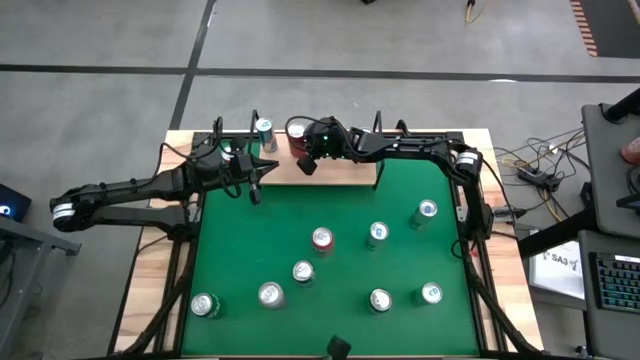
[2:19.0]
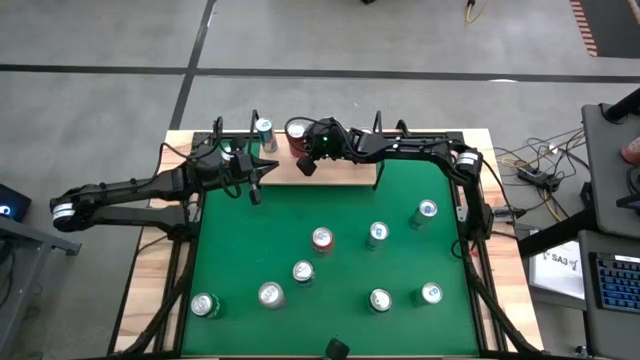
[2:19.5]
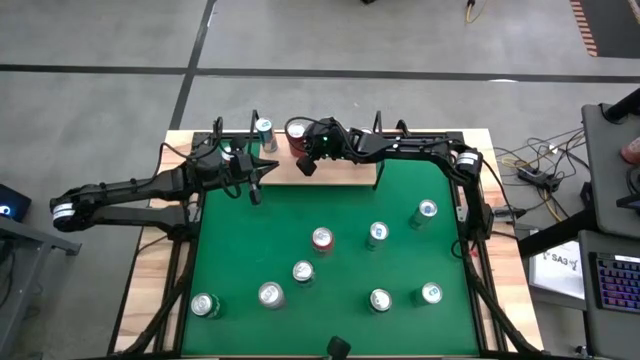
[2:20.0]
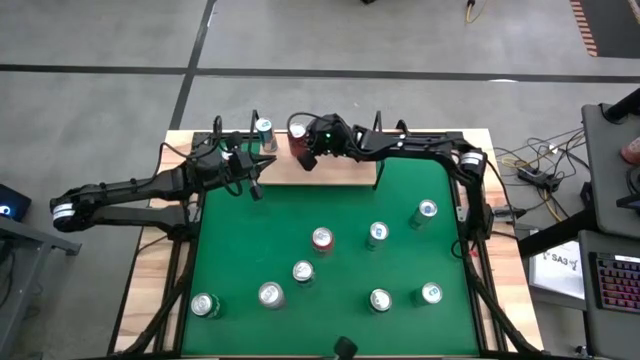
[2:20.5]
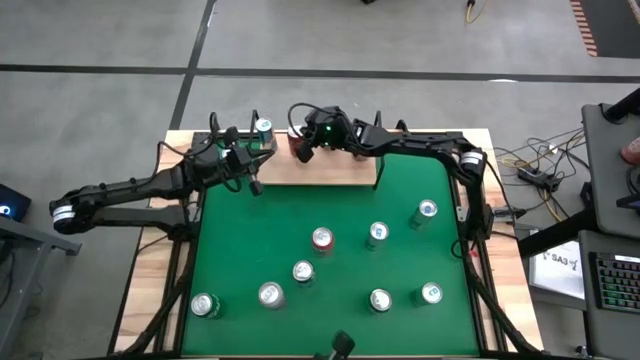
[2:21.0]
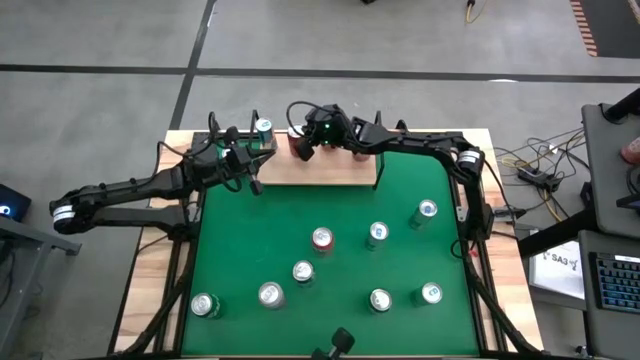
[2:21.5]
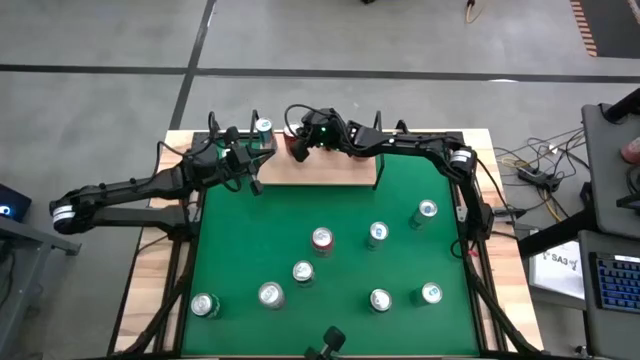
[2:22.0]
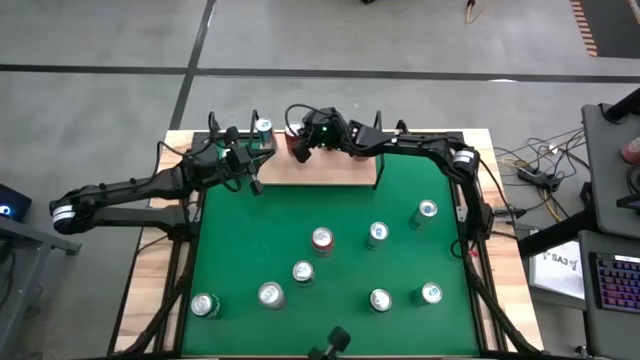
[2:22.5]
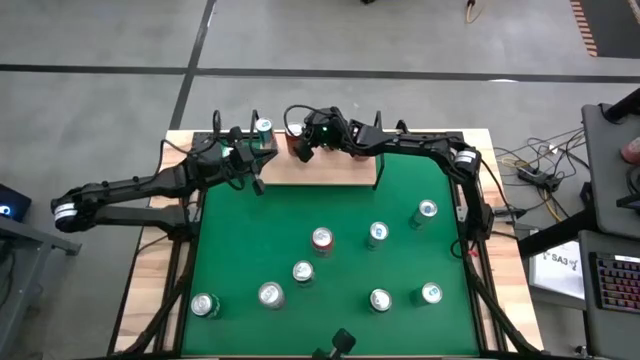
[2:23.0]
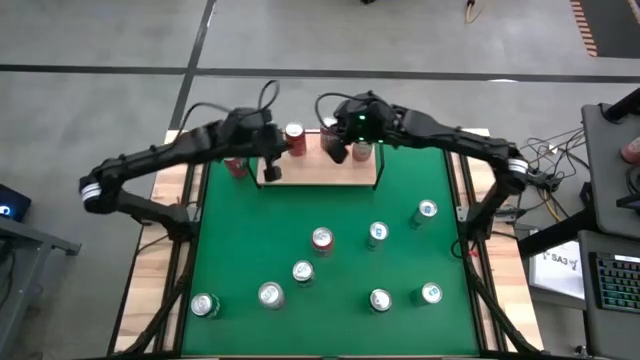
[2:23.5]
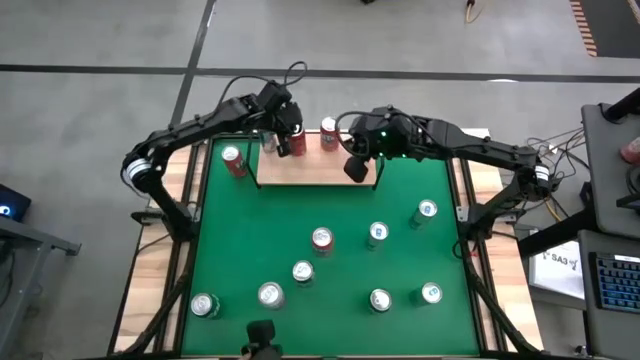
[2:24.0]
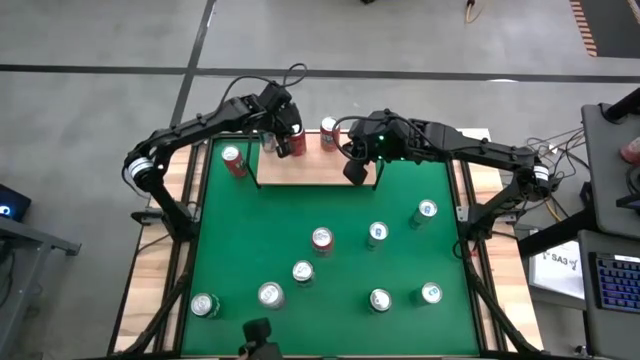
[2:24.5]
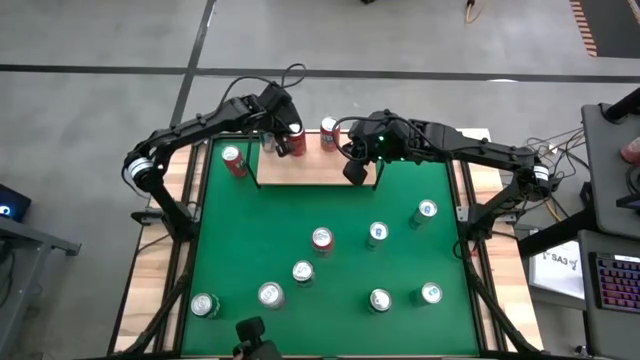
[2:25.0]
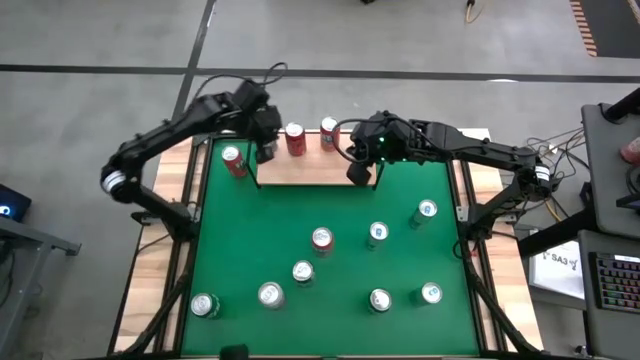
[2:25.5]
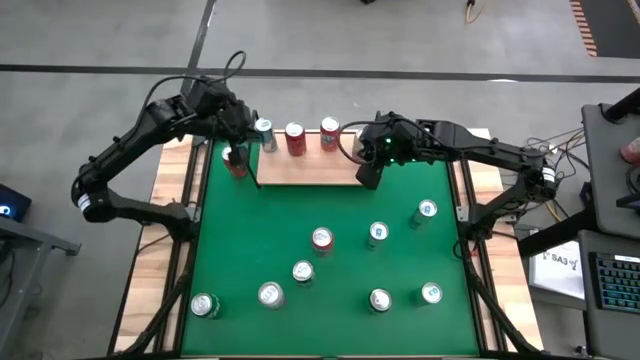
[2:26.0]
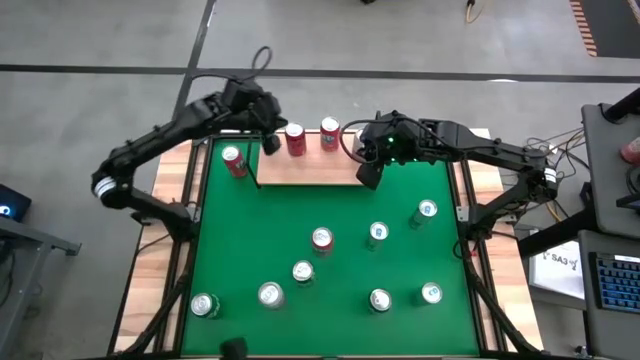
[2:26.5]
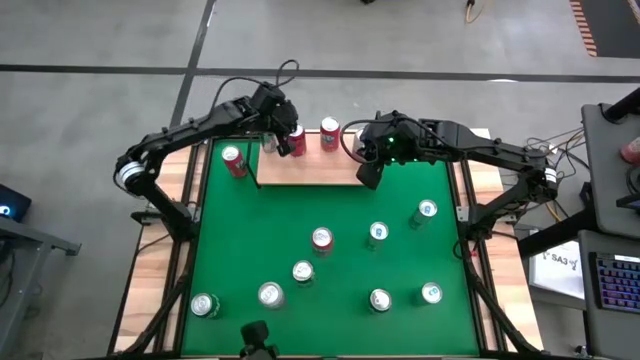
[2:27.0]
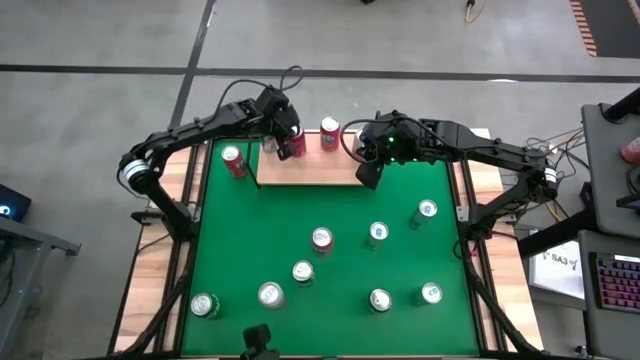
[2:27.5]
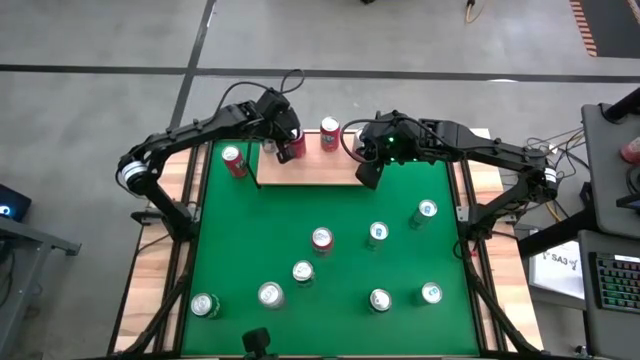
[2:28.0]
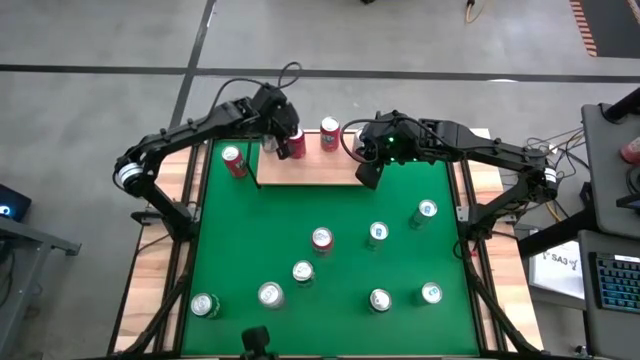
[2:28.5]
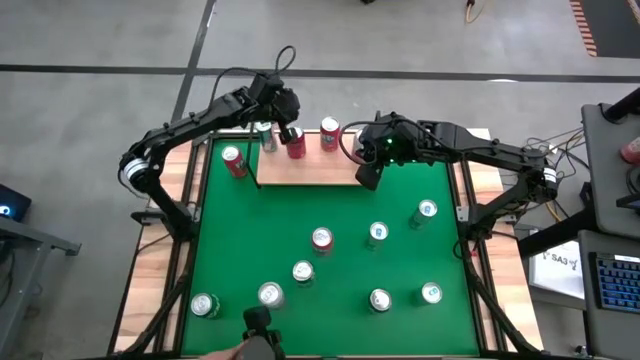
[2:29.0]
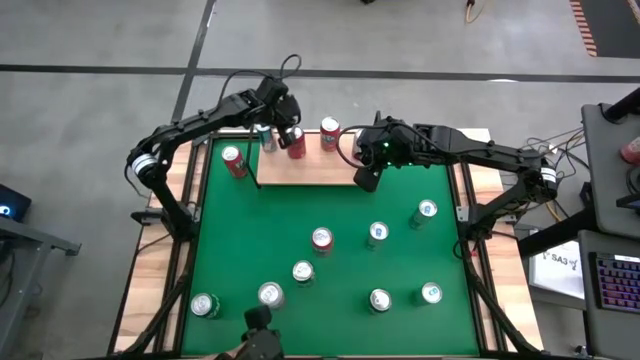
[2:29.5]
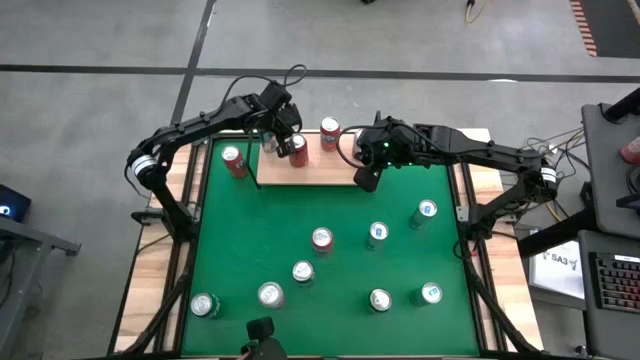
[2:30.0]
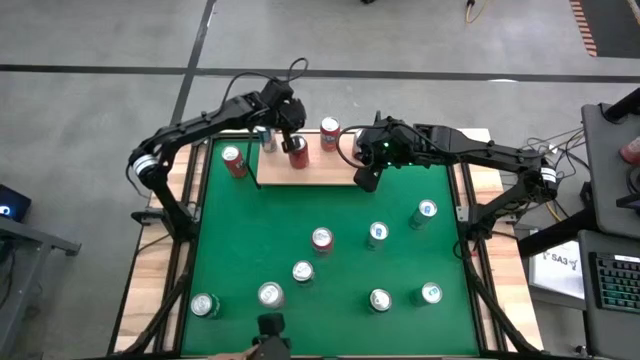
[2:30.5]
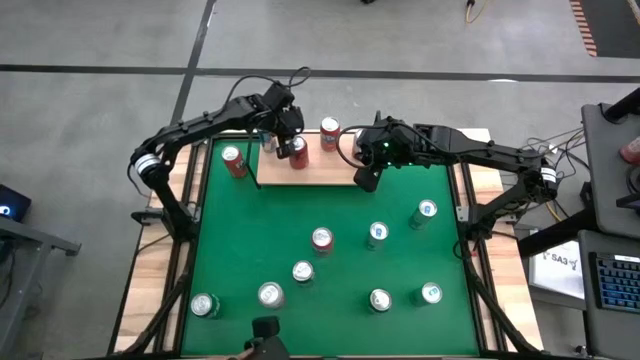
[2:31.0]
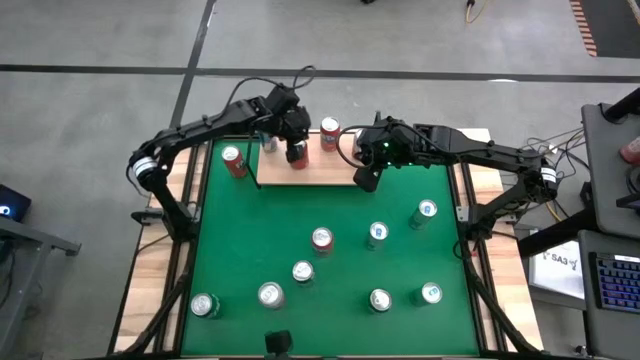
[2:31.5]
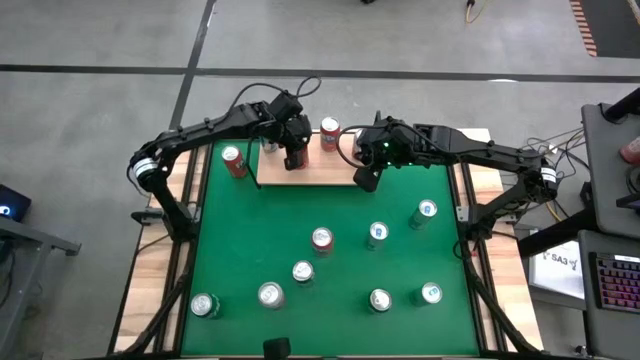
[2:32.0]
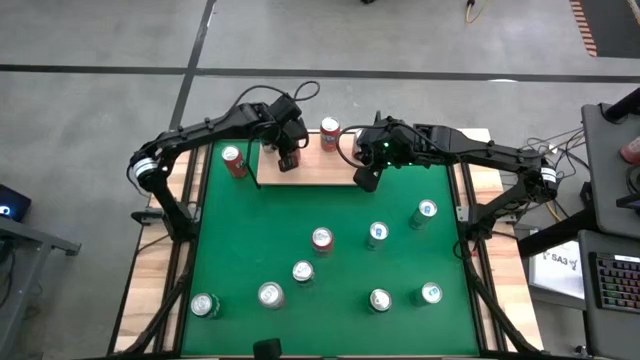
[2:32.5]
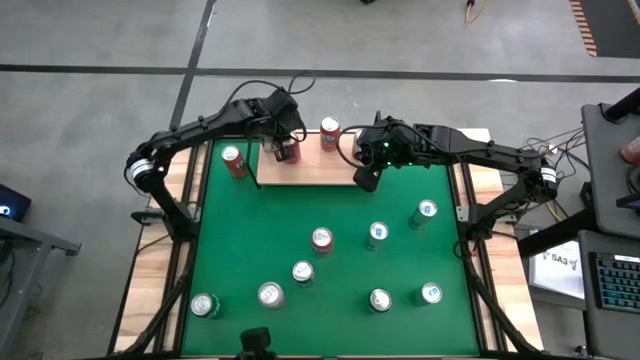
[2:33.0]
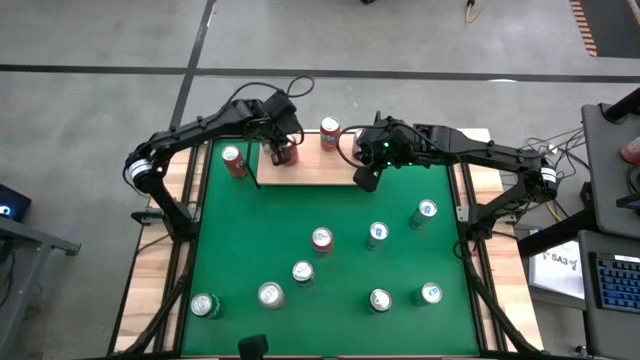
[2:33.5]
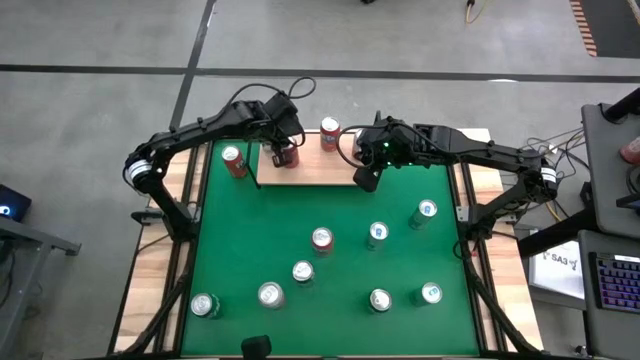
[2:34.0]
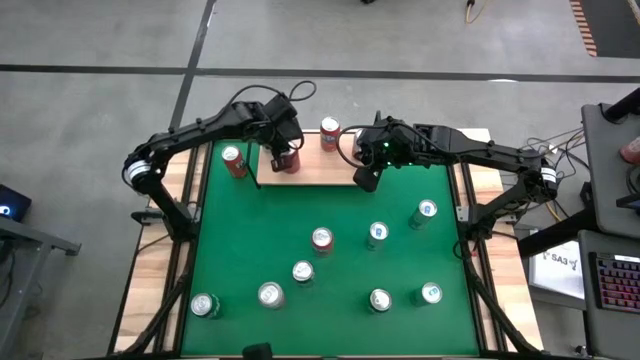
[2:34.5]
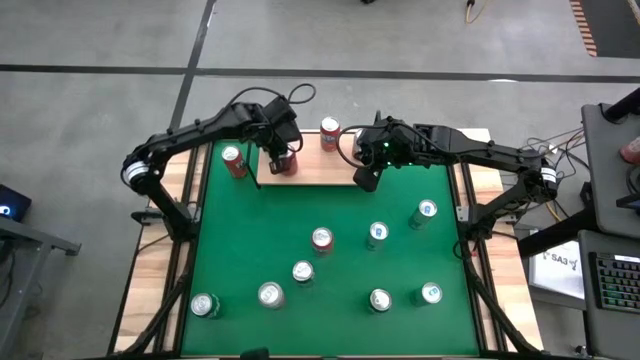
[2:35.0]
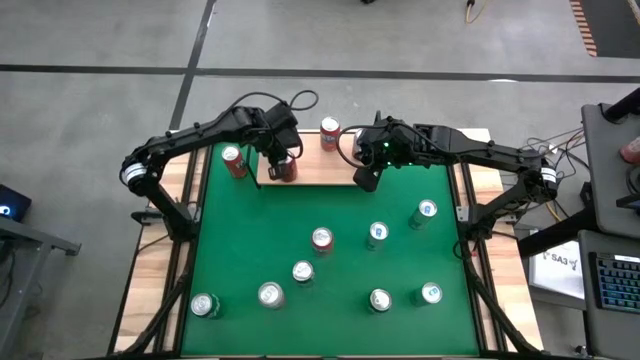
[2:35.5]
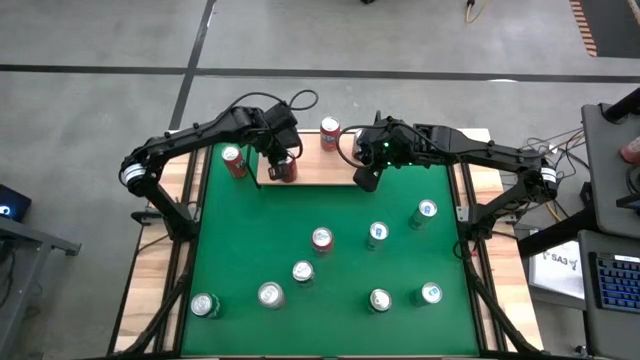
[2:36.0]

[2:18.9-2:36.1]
Task: Pick and place cans onto a shelf
Put the red soda can on the shelf

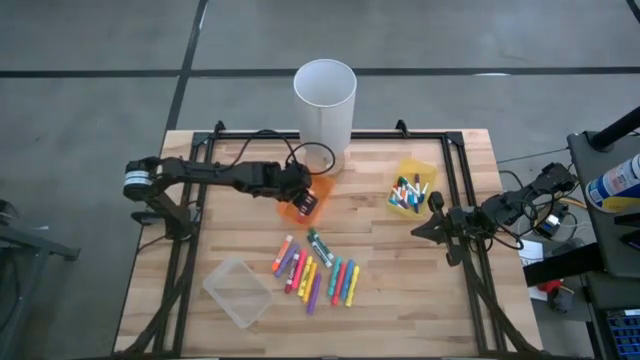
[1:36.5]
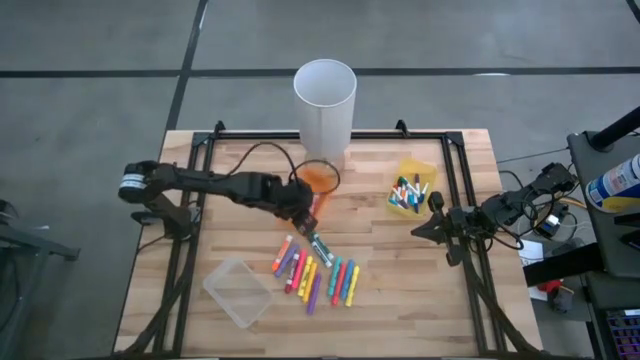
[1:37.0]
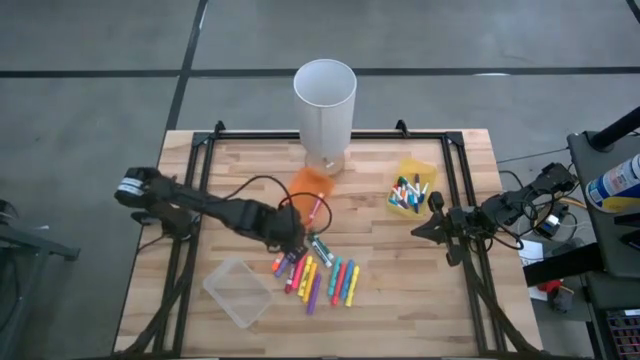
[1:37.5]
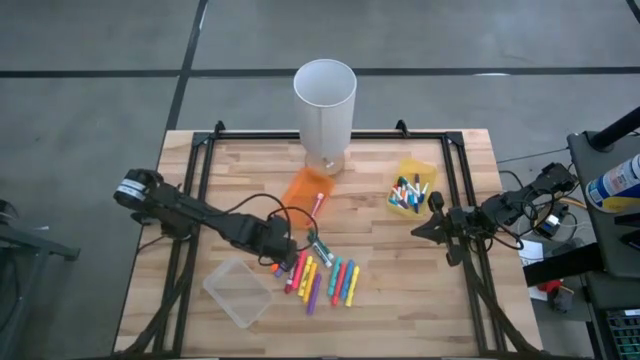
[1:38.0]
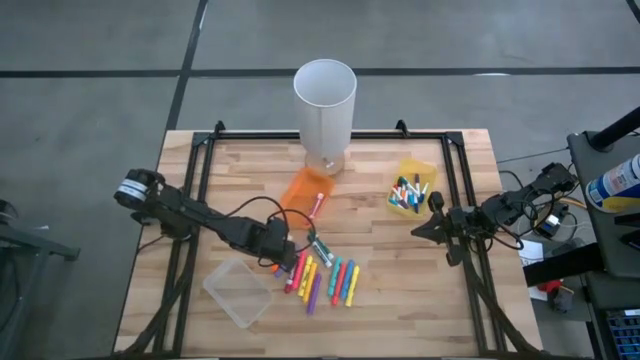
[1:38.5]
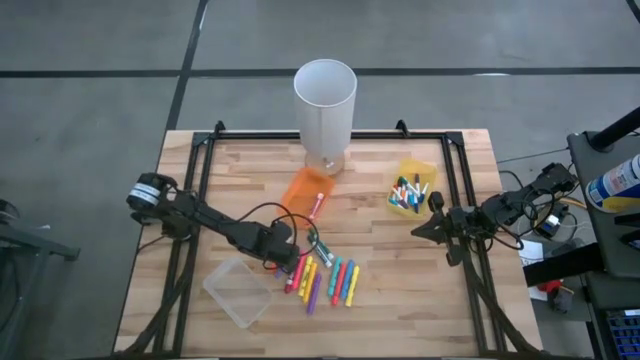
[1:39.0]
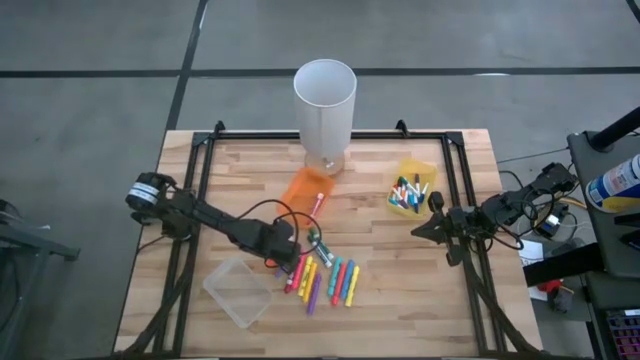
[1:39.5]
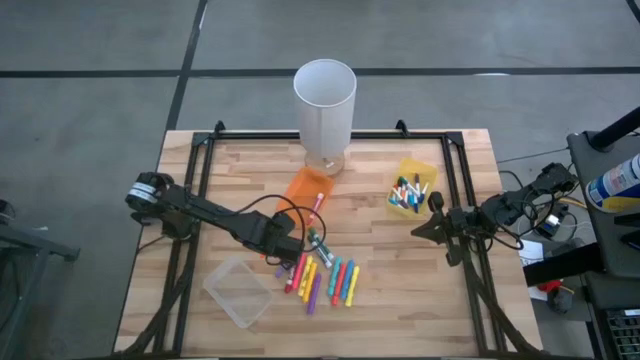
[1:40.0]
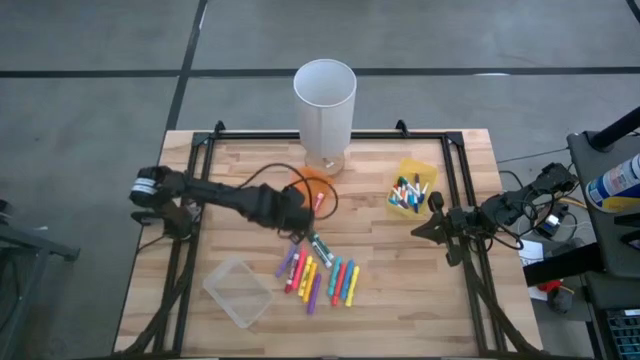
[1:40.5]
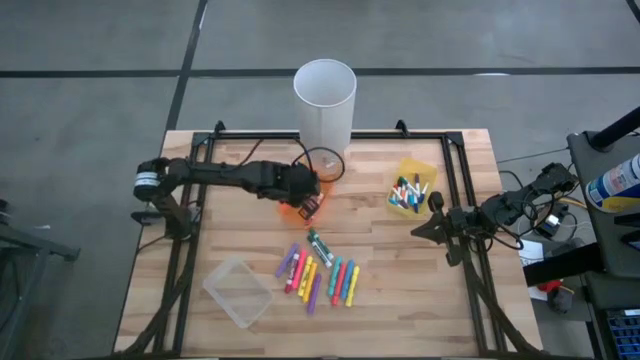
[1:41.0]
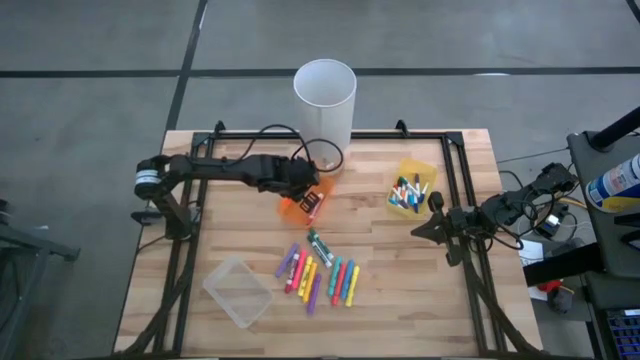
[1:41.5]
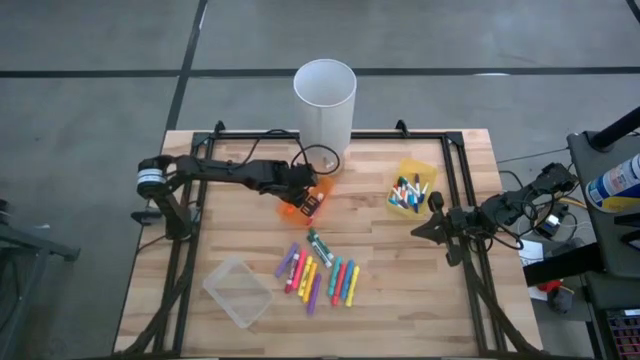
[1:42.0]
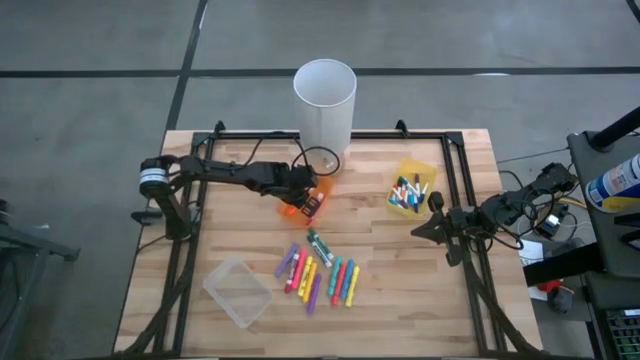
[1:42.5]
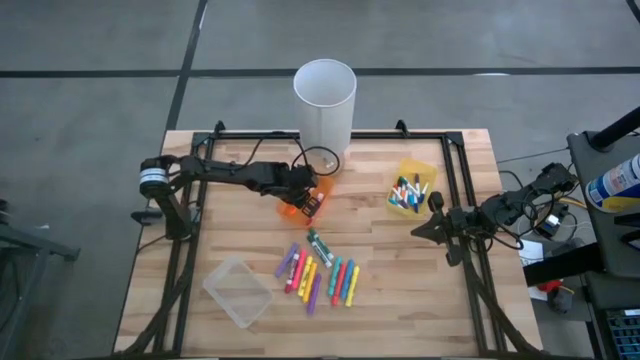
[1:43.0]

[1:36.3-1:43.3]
Task: Pick & Place Markers
Put the large orange marker pen into the orange bin
